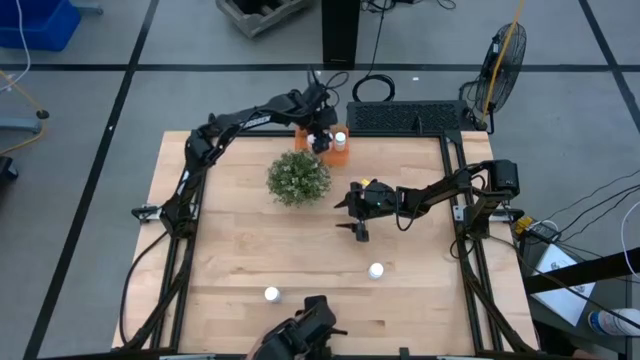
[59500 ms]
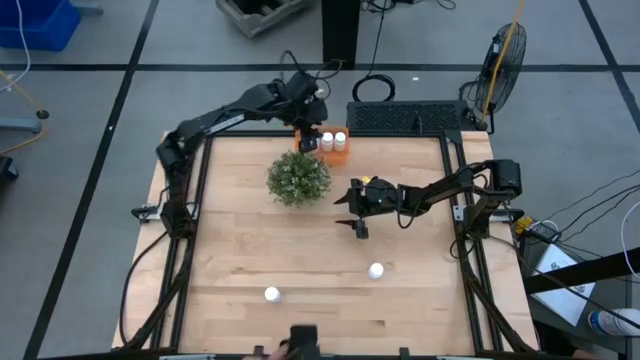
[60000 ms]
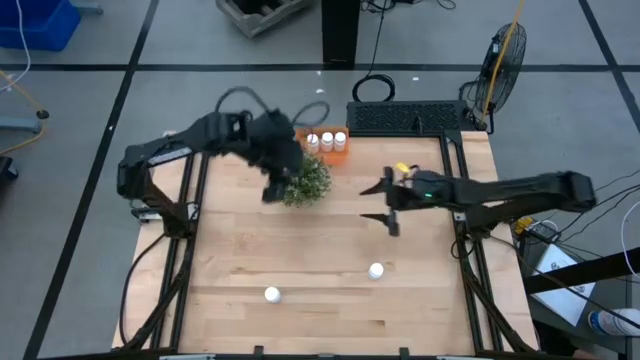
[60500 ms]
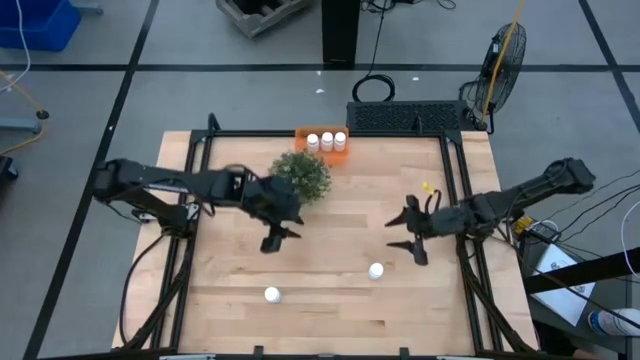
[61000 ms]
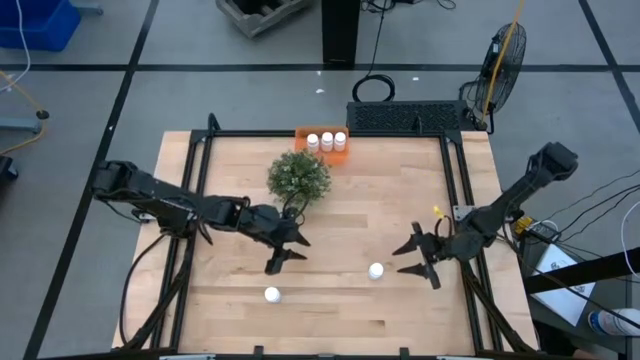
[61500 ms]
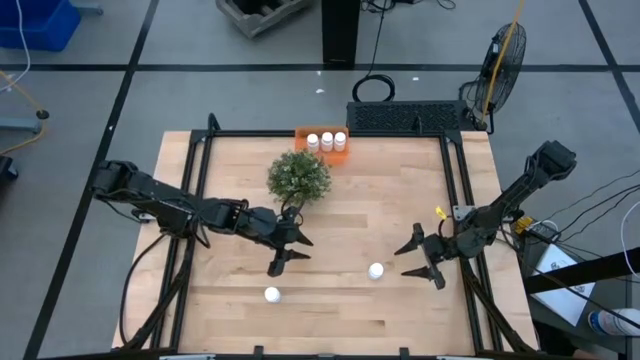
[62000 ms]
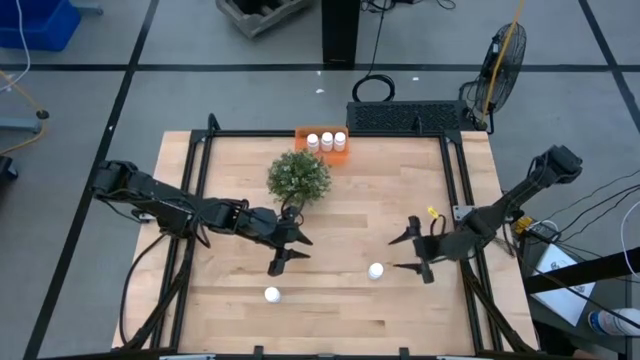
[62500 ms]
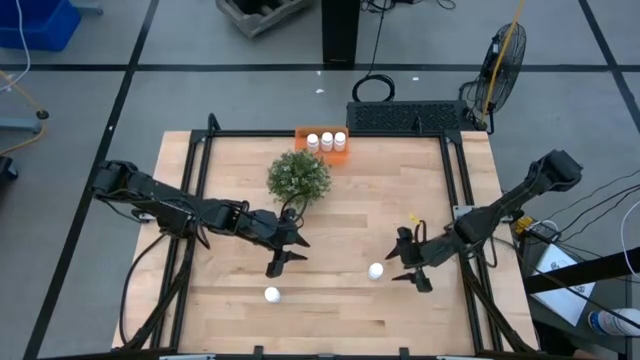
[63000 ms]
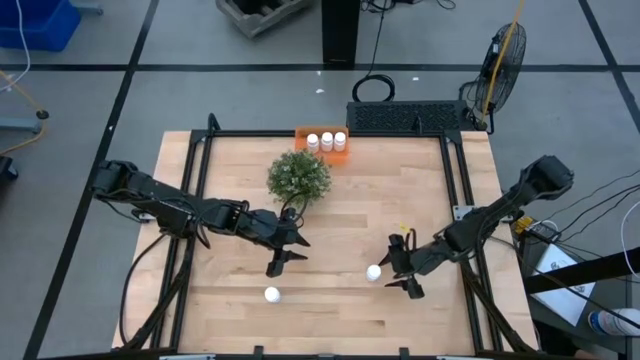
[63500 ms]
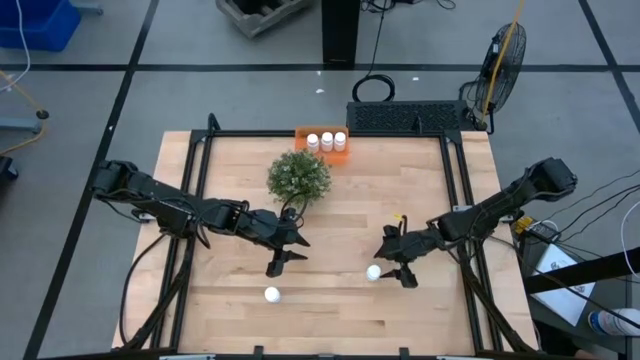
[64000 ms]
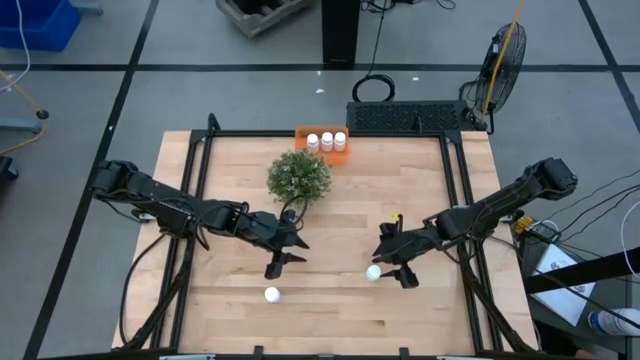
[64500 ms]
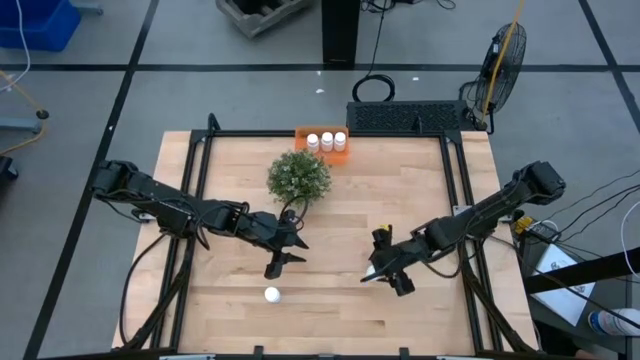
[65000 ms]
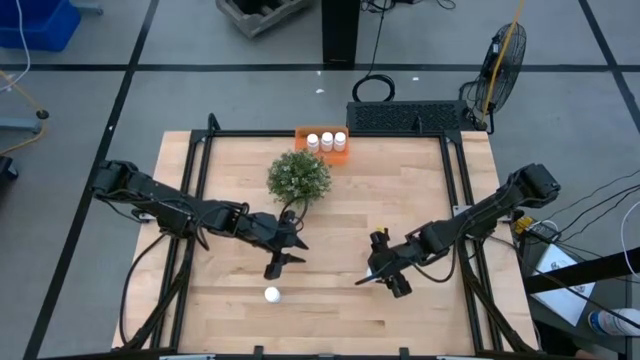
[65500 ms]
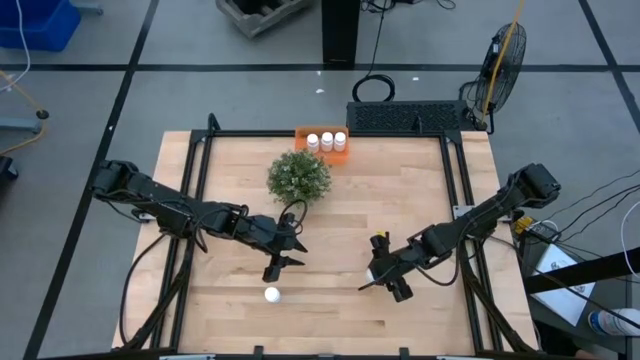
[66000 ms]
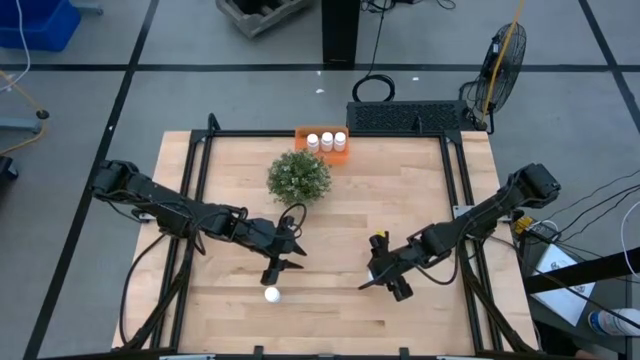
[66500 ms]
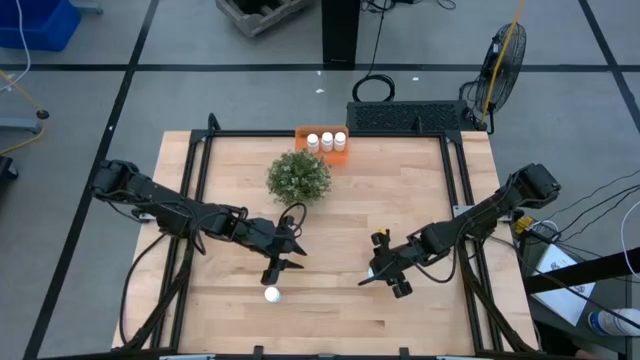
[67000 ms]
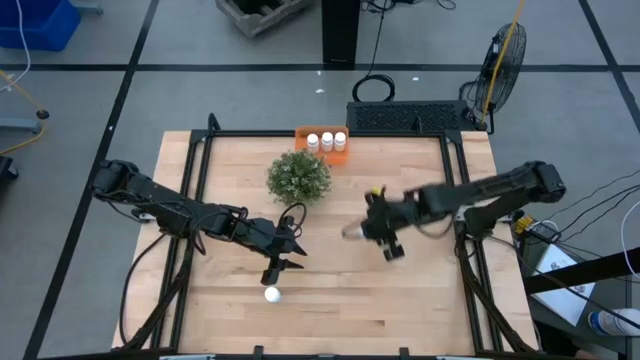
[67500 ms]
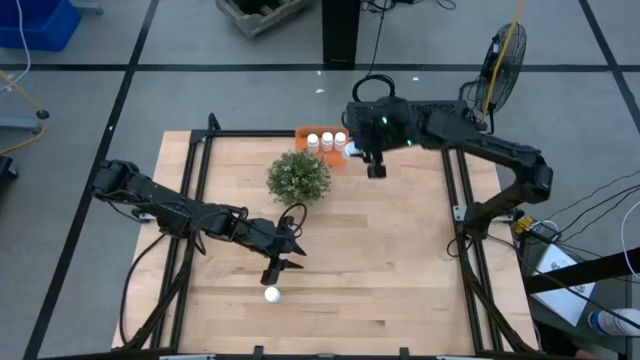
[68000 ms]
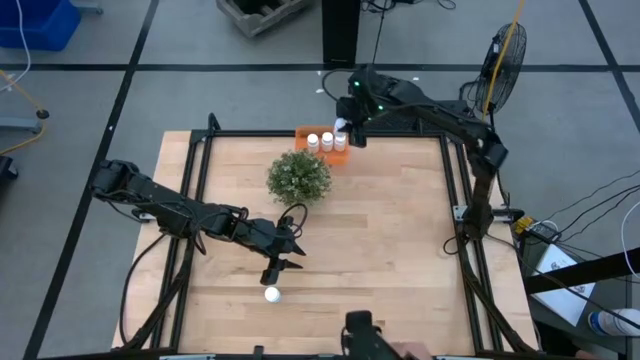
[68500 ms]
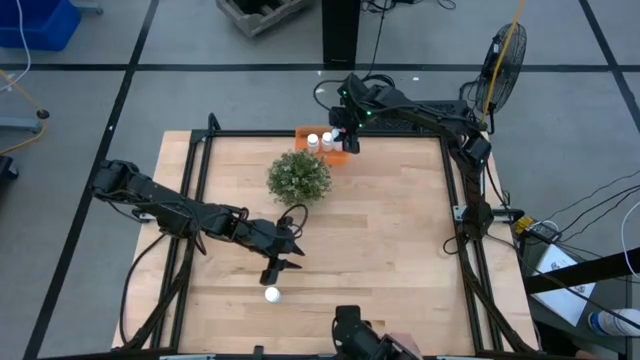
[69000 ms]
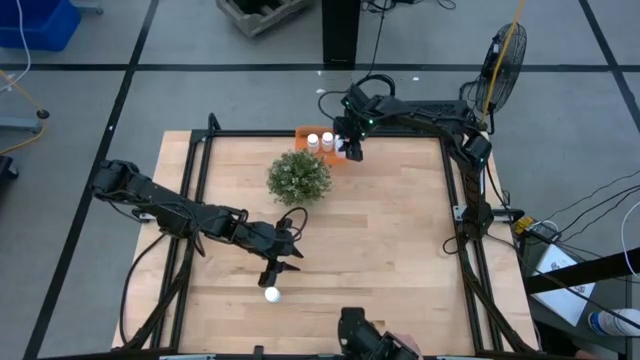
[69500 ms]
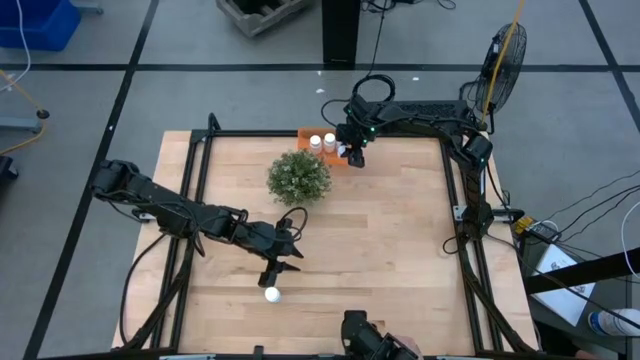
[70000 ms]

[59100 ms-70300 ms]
Task: Pick and place pill bottles into a basket
Put the white pill bottle into the orange bin

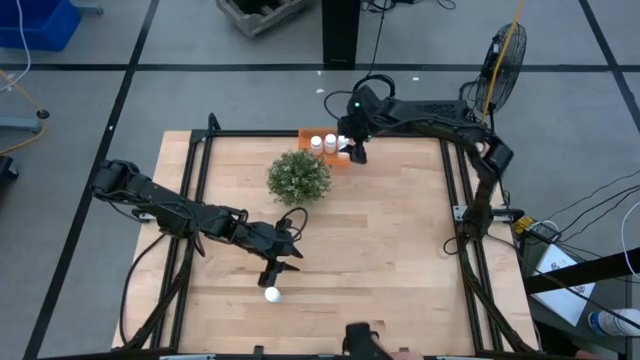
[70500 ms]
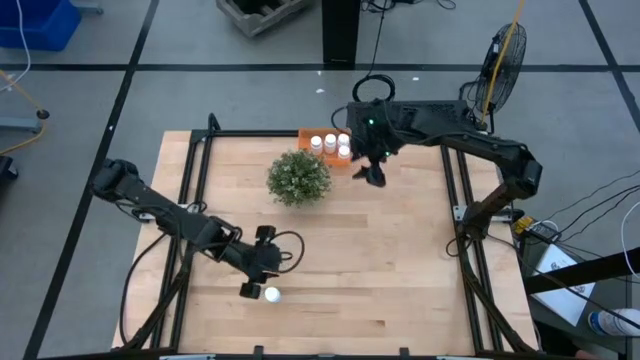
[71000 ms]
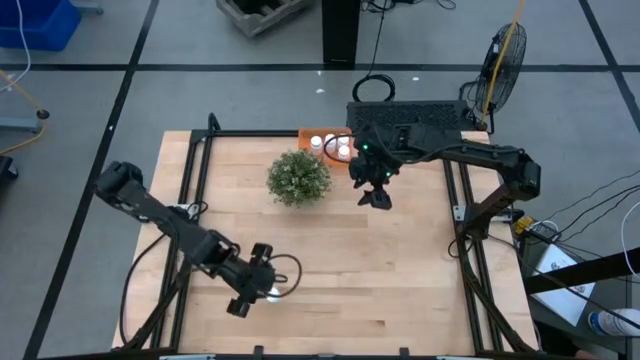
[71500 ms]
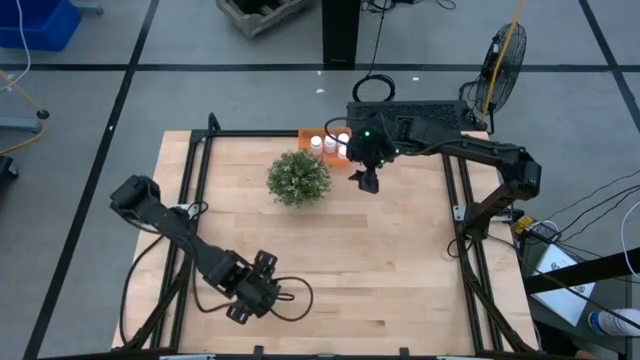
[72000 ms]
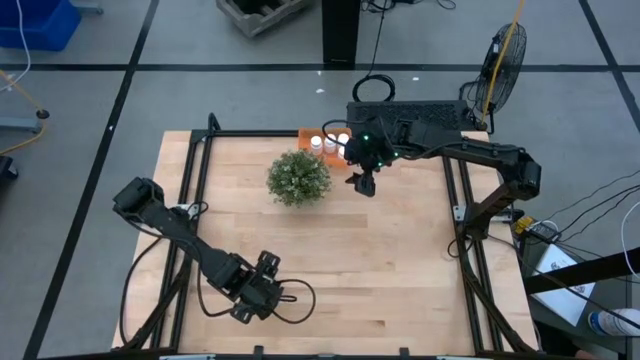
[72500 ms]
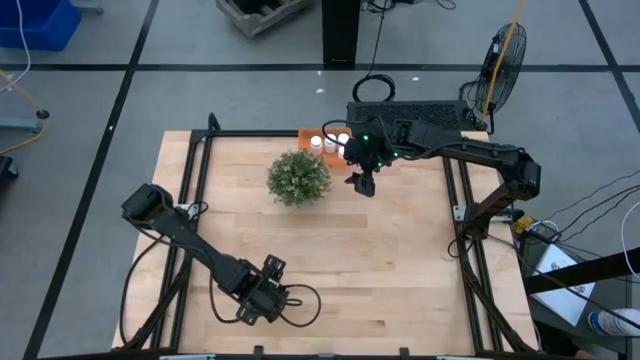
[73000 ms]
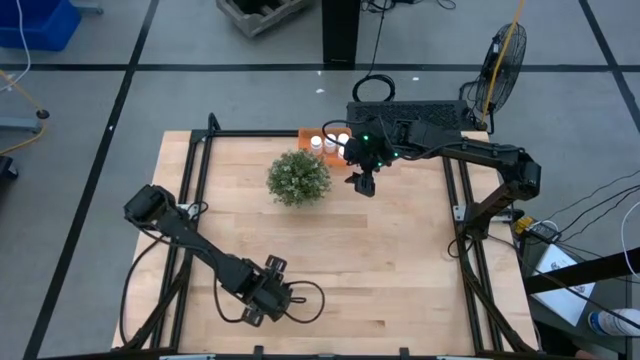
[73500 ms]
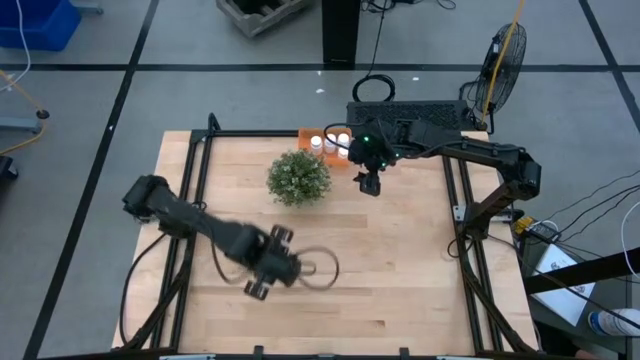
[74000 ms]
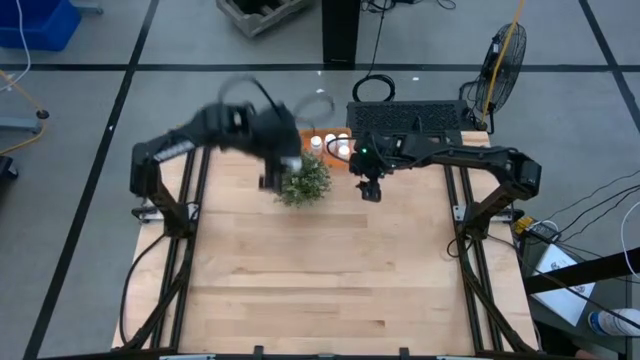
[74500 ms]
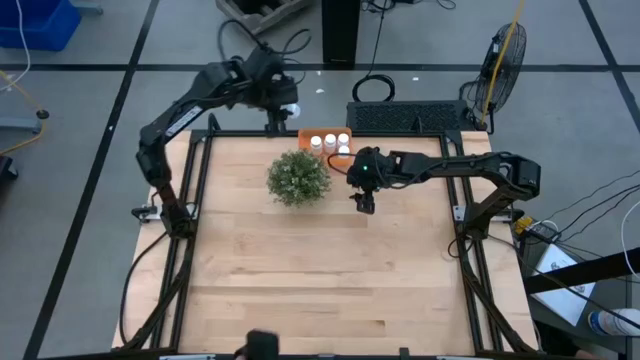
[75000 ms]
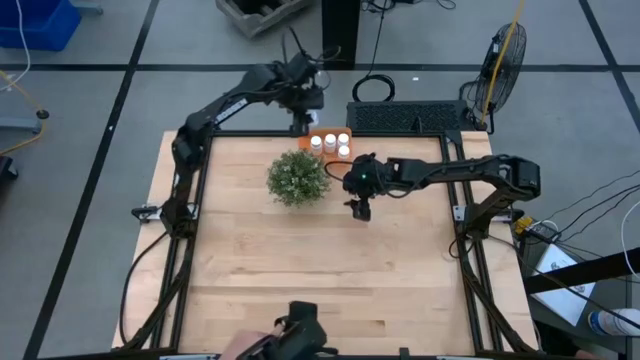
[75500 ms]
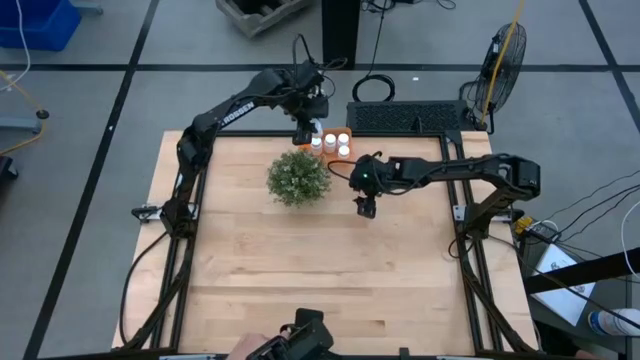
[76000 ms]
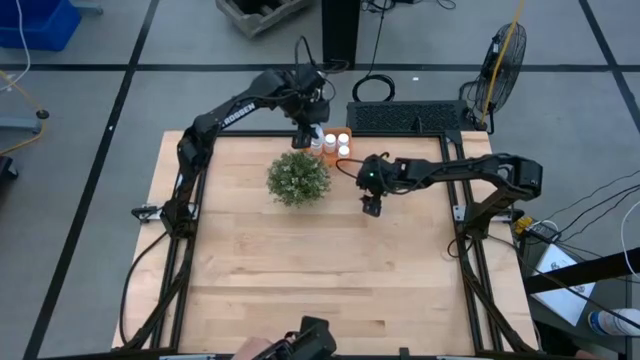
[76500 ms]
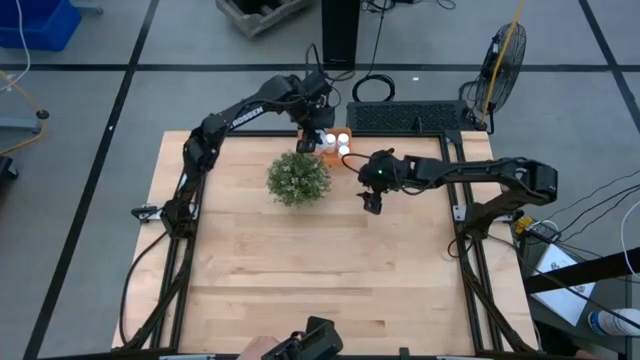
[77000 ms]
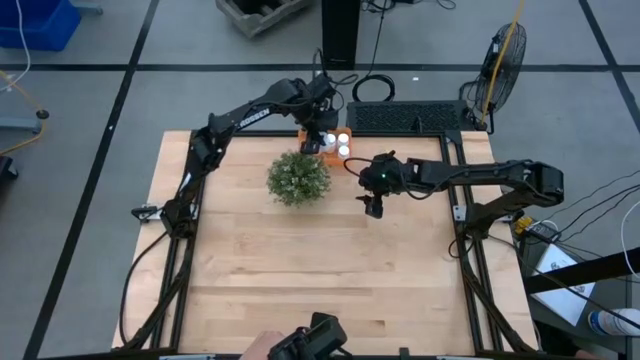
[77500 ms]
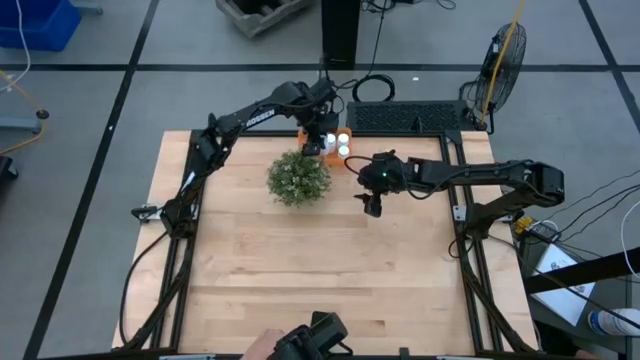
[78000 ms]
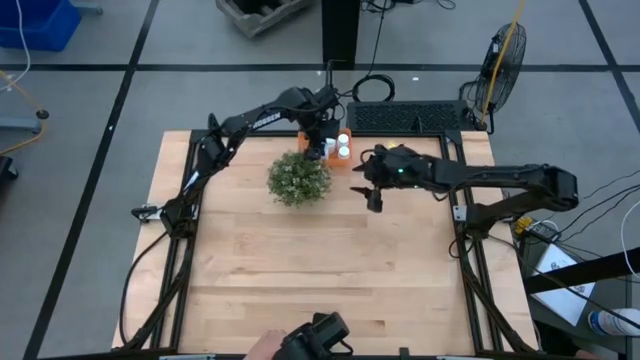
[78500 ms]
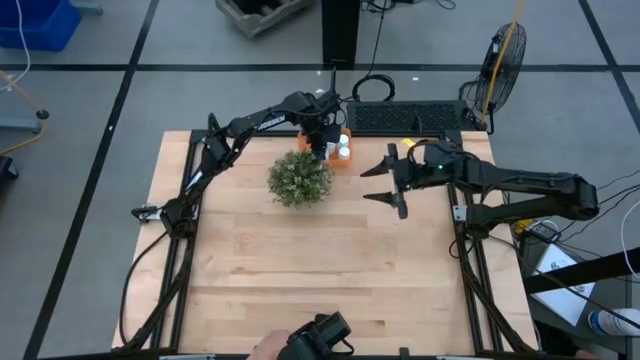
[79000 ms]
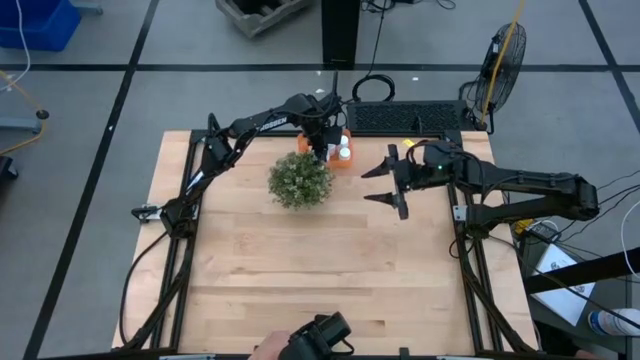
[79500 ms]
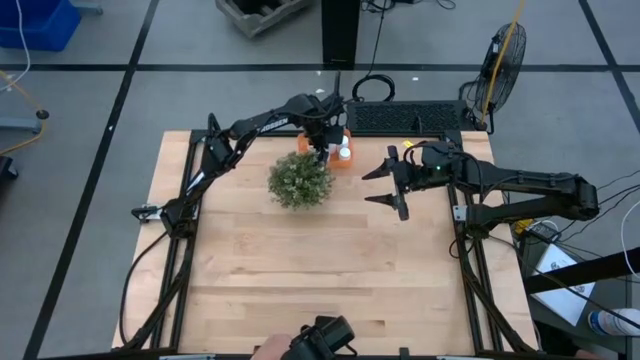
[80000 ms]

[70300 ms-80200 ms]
Put the white pill bottle into the orange bin
